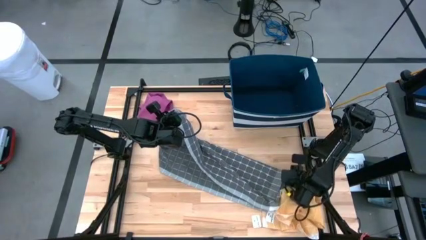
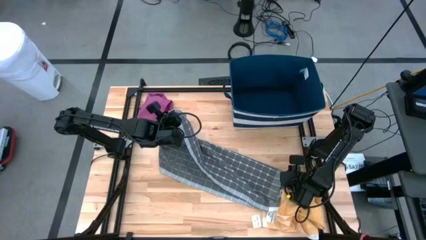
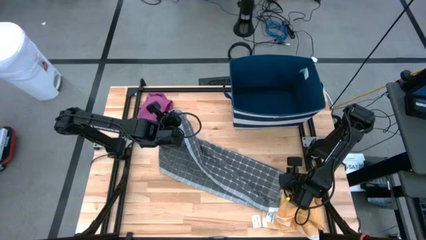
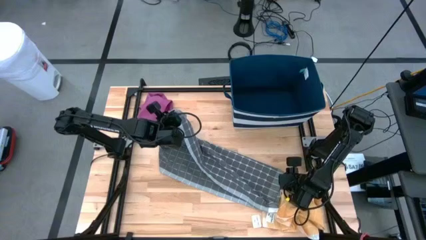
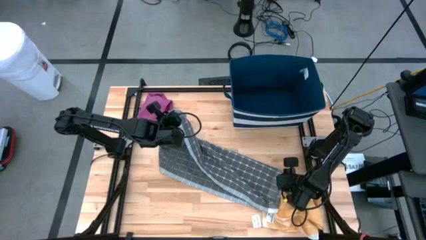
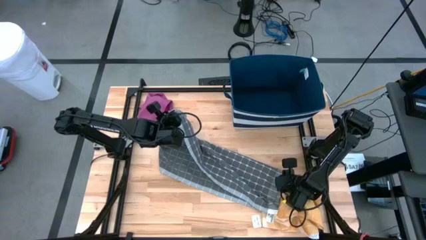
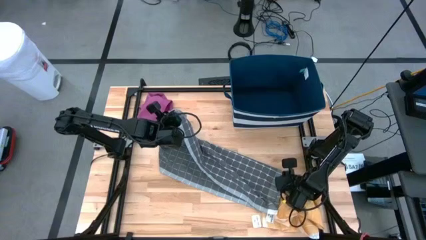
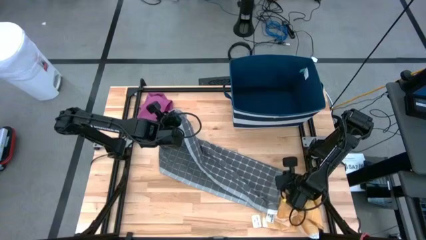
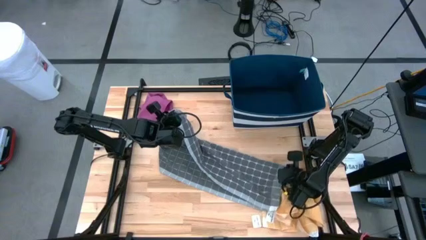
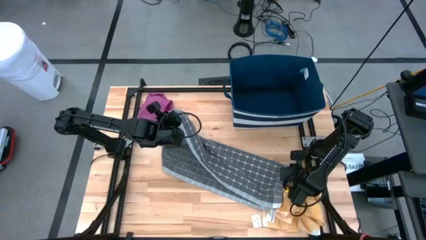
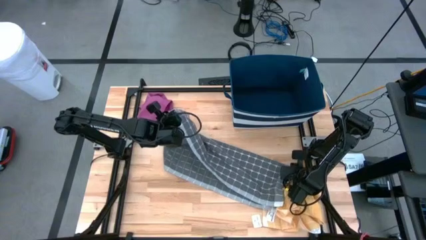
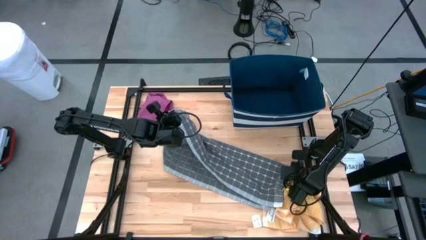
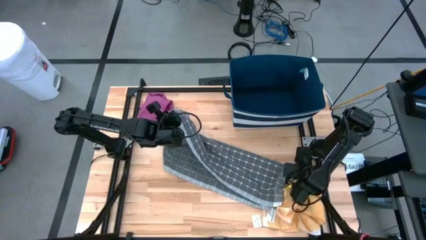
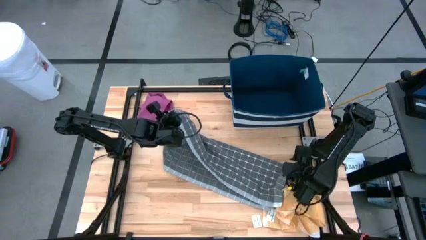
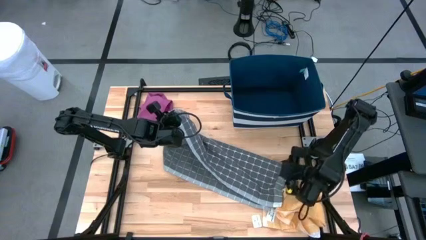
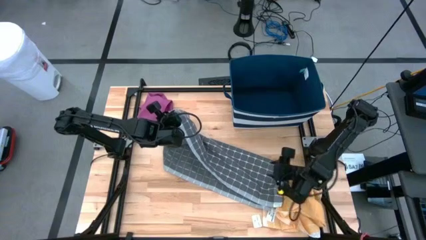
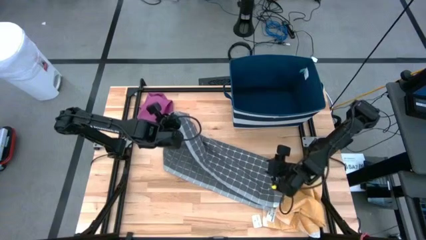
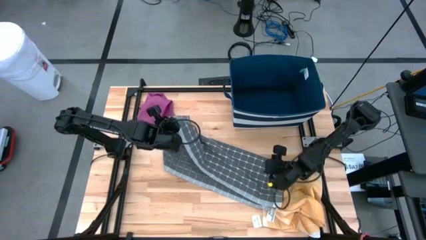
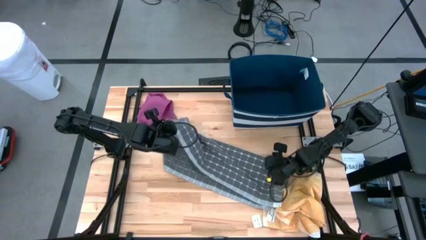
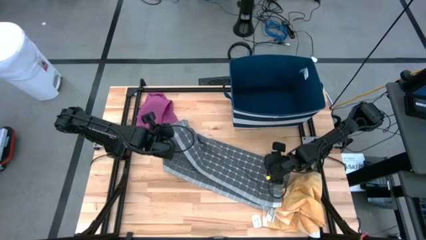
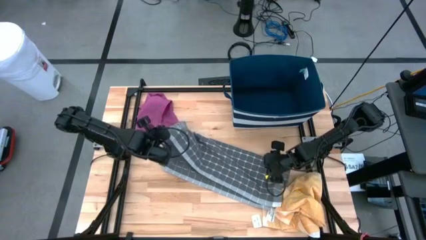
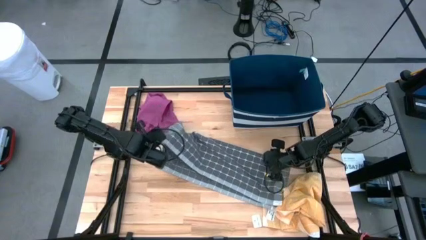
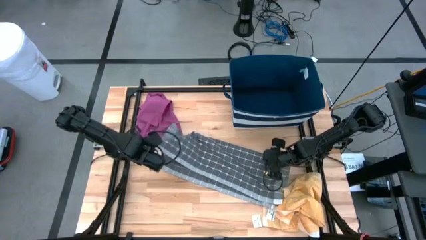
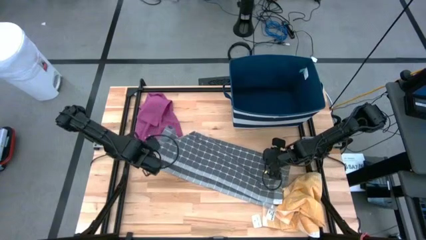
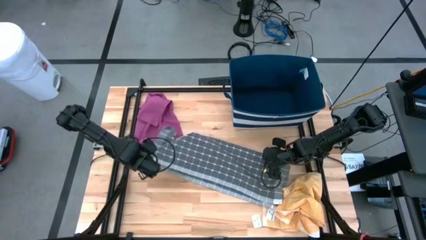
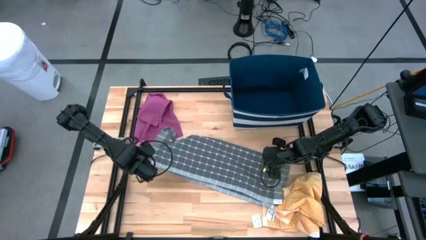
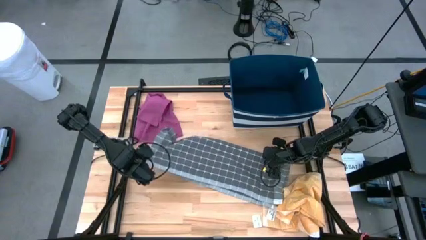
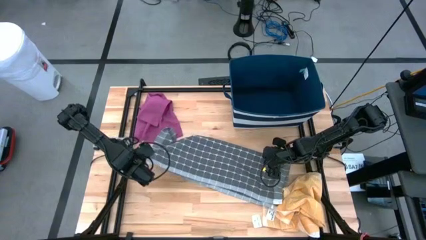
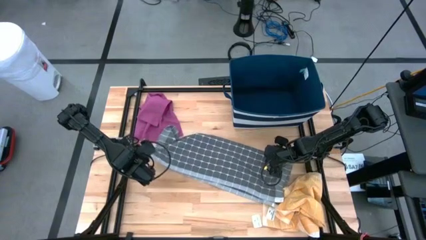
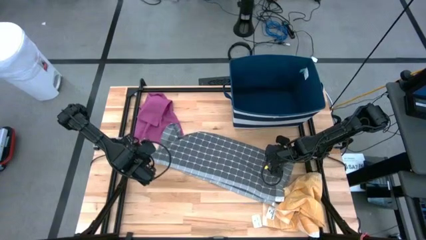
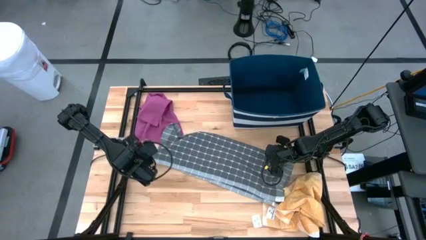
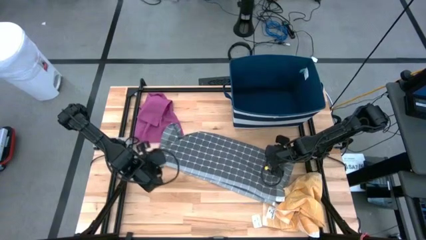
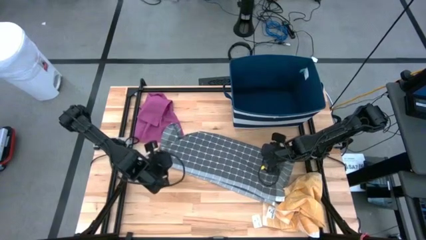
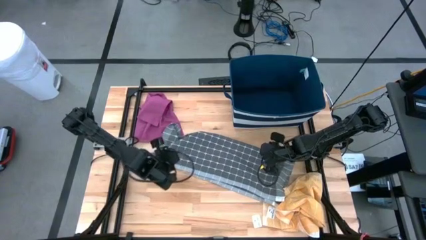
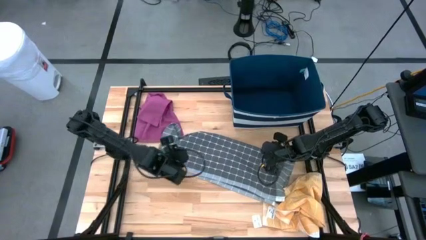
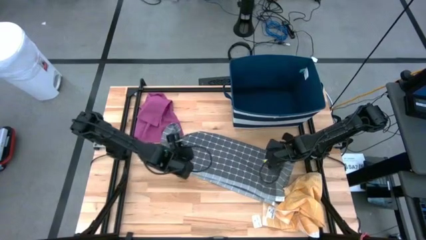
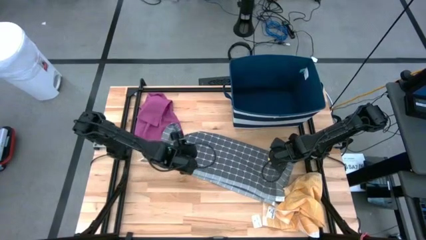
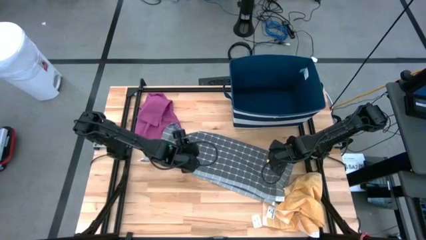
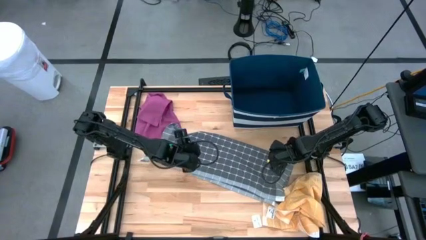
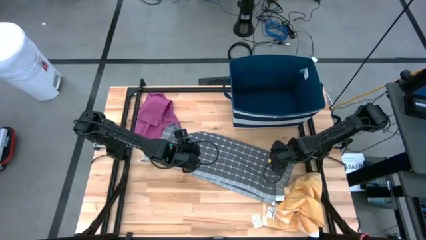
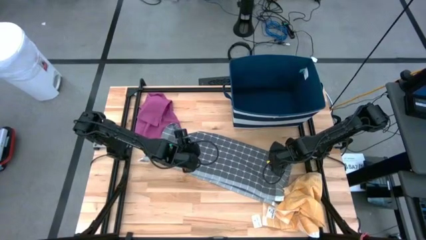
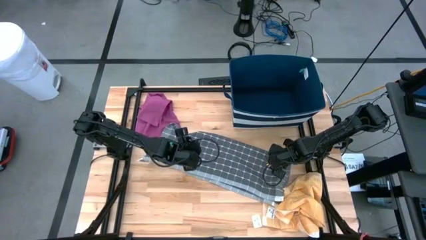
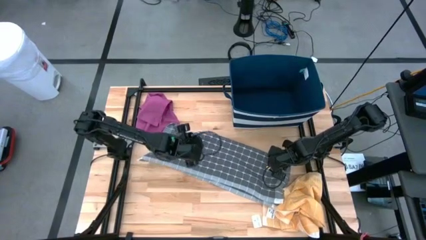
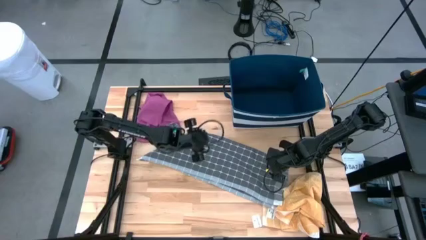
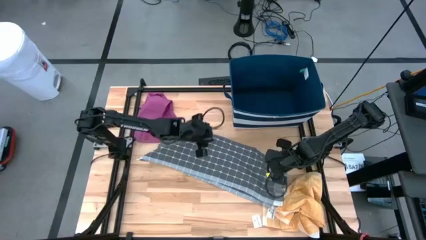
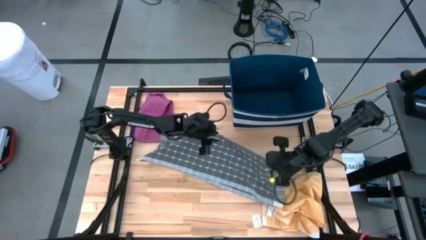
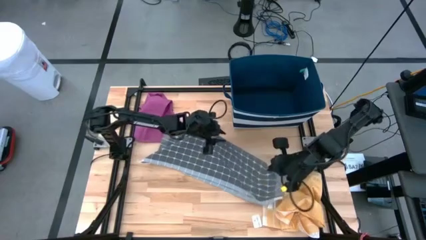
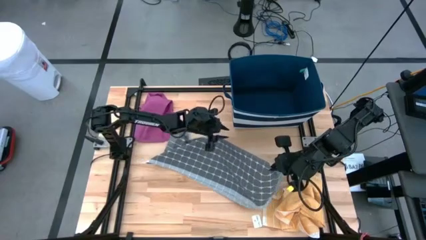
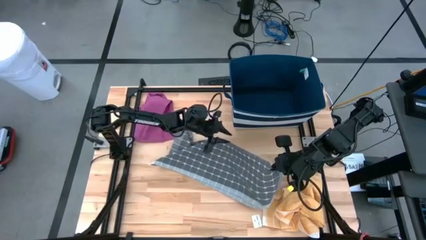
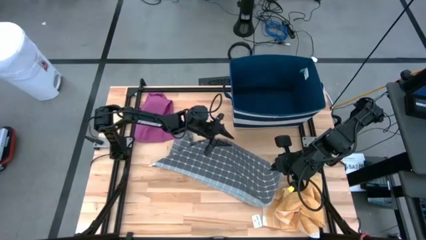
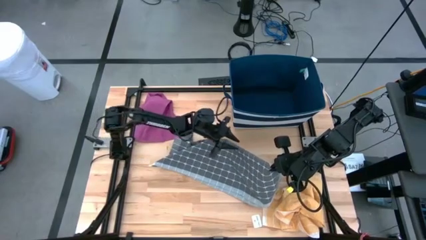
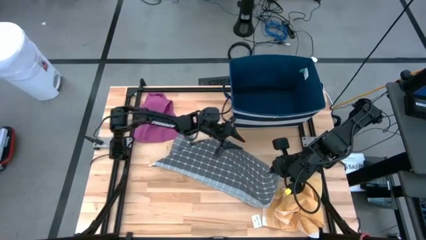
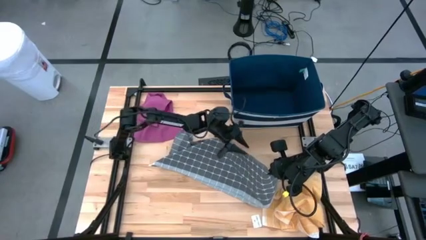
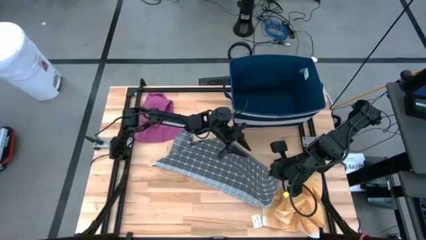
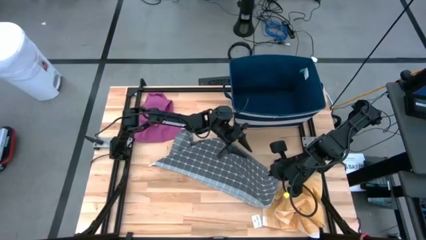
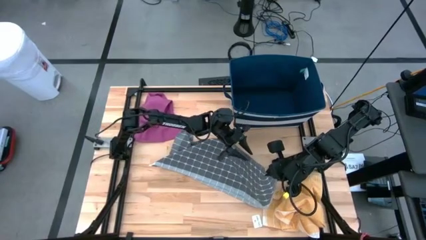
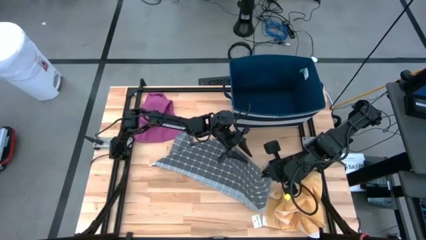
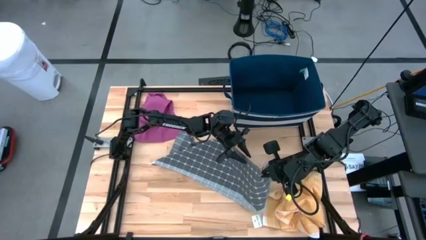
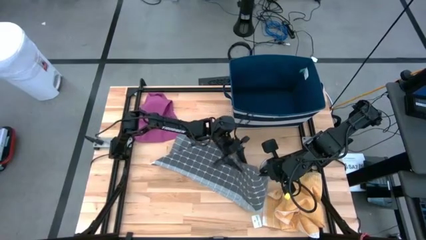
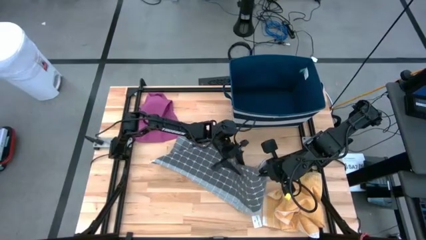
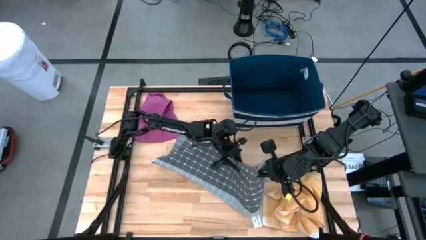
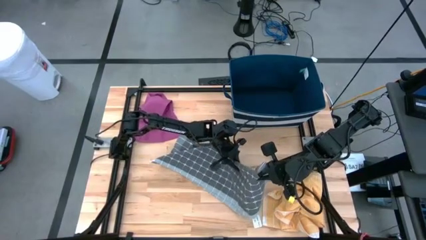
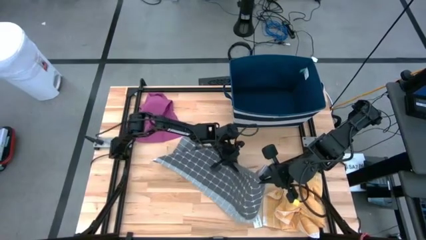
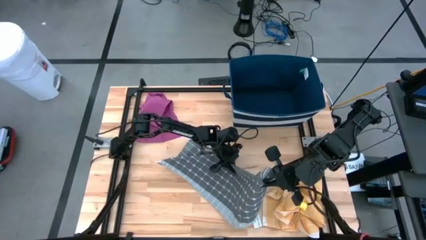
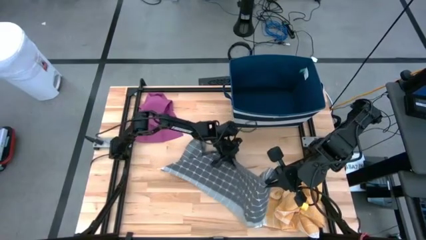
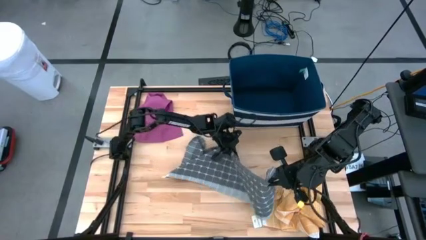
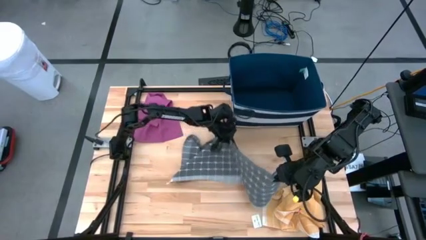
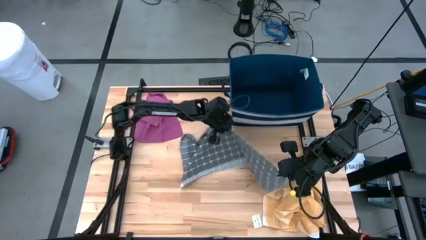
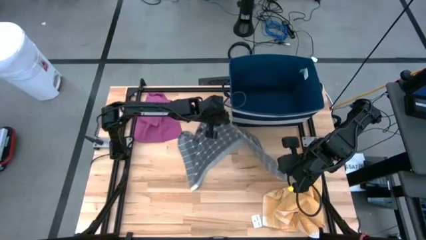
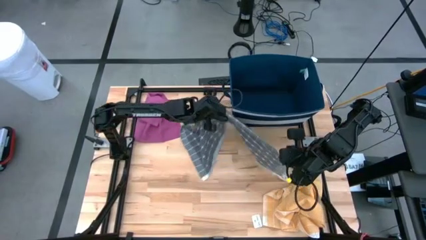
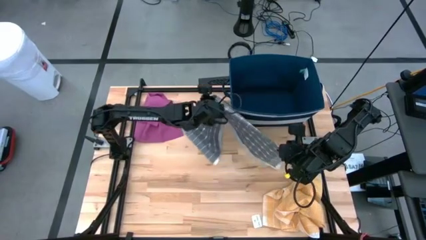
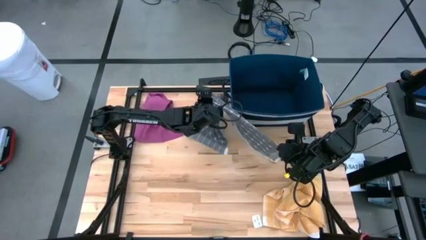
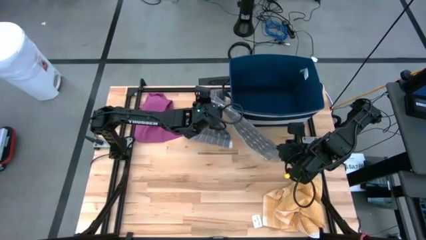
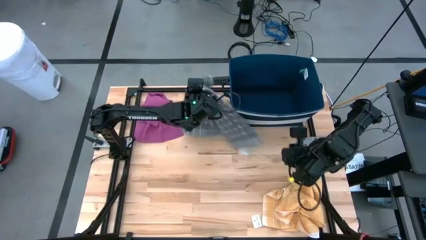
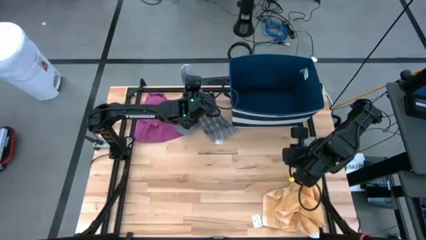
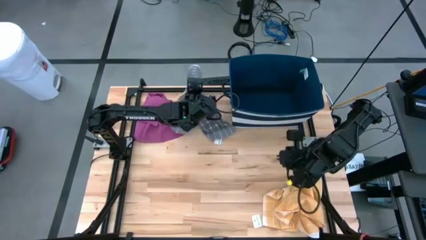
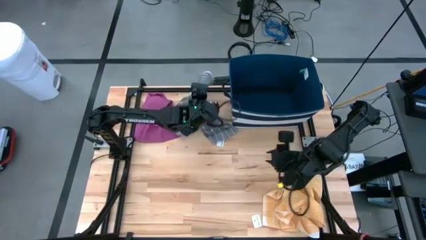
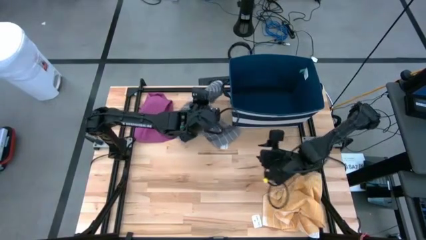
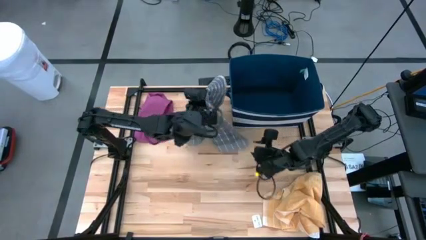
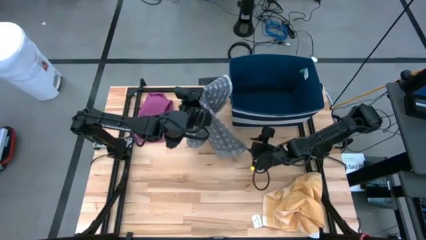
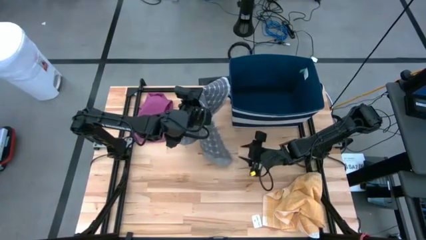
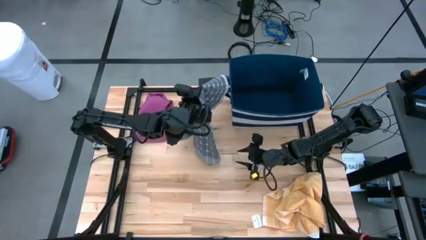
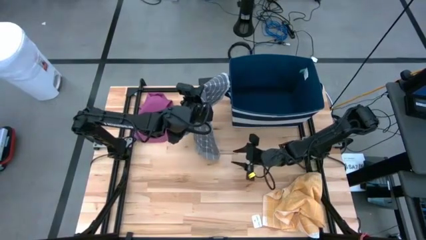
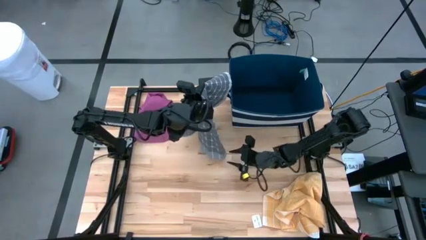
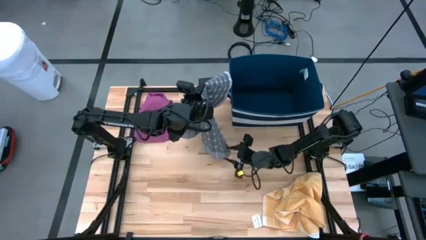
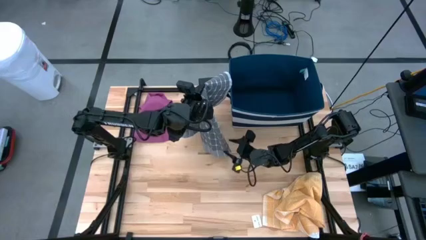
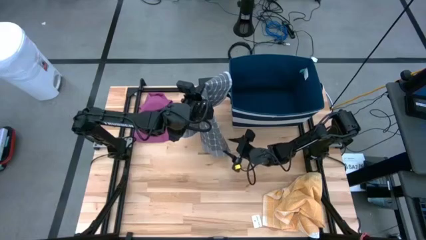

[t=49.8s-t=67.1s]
Task: Fold towel
Fold the gray checkered towel
